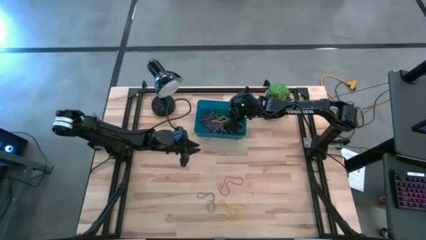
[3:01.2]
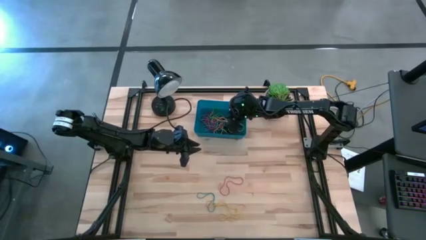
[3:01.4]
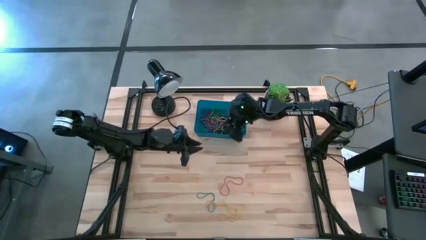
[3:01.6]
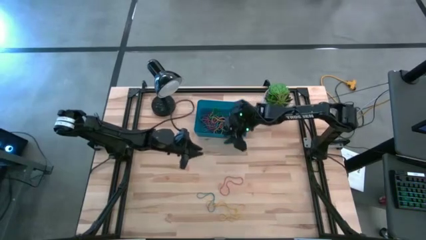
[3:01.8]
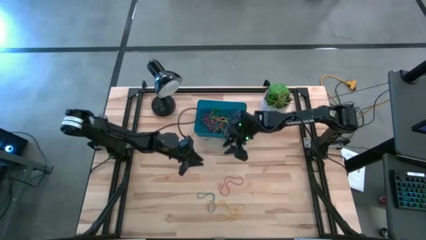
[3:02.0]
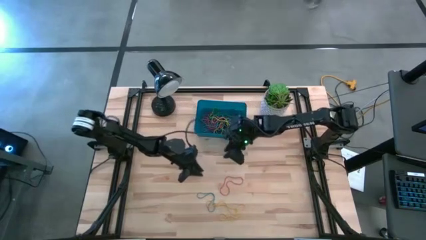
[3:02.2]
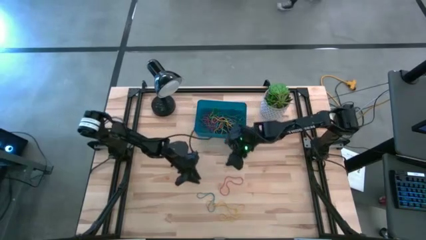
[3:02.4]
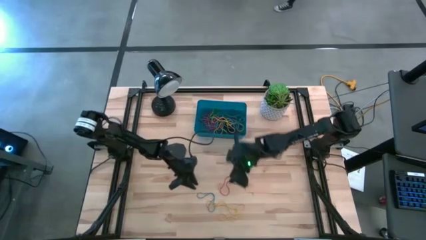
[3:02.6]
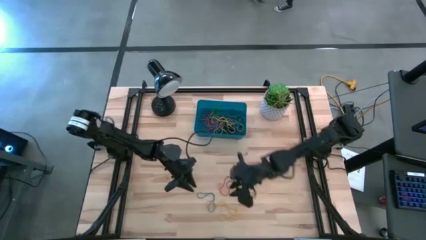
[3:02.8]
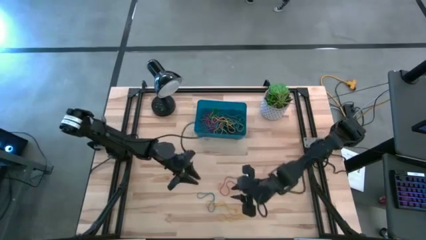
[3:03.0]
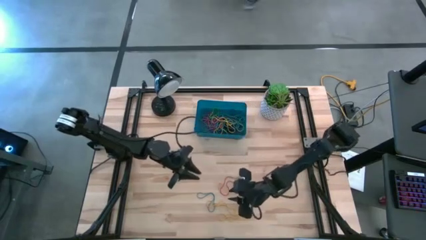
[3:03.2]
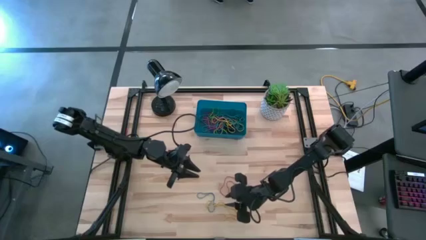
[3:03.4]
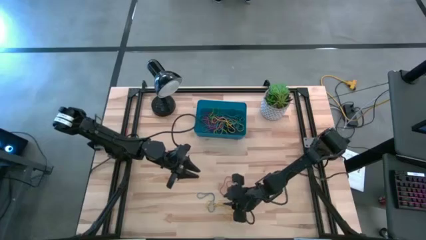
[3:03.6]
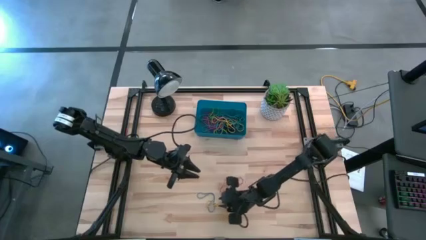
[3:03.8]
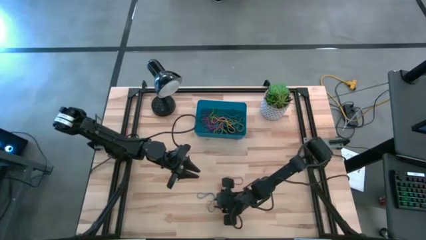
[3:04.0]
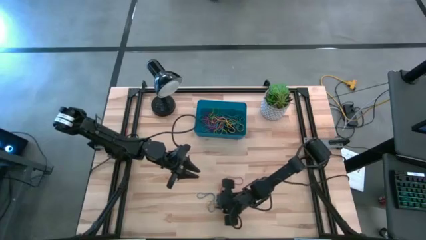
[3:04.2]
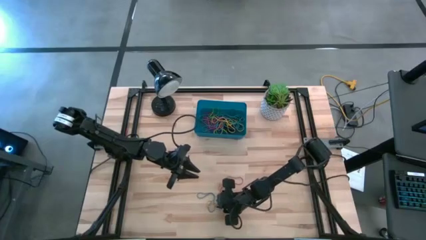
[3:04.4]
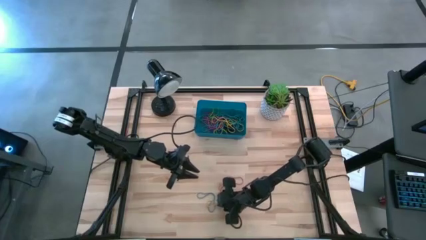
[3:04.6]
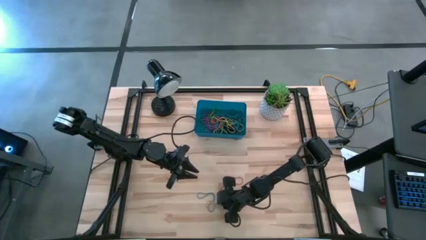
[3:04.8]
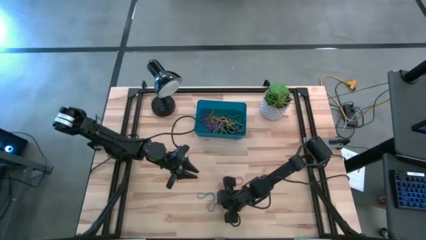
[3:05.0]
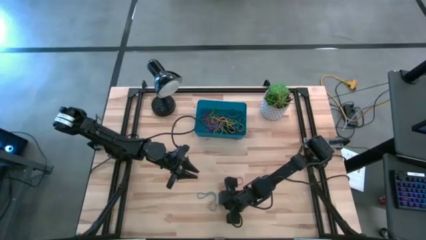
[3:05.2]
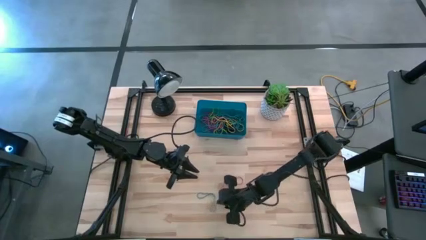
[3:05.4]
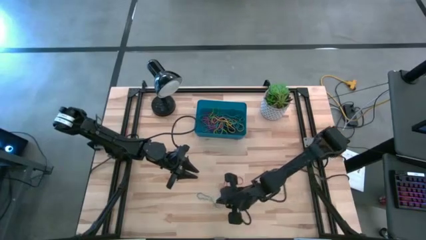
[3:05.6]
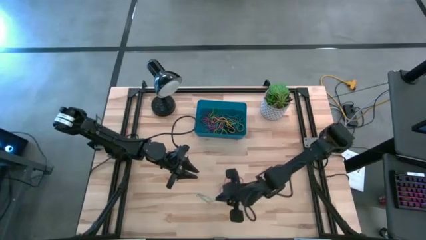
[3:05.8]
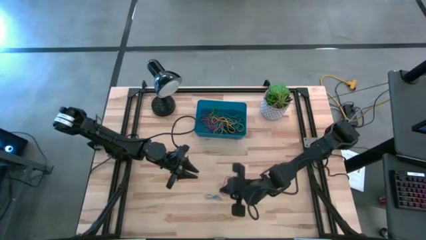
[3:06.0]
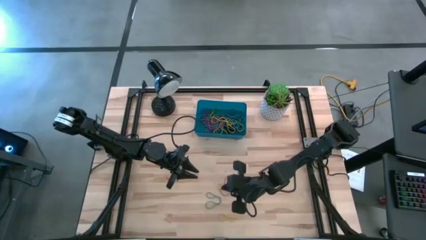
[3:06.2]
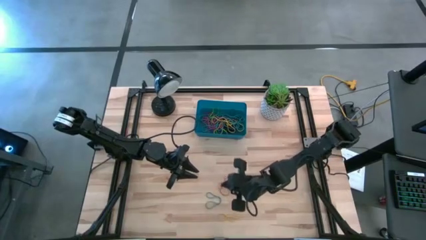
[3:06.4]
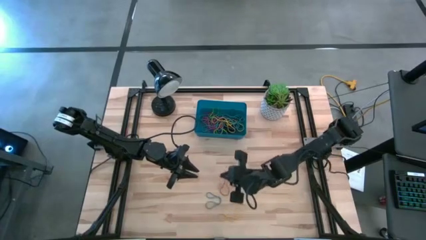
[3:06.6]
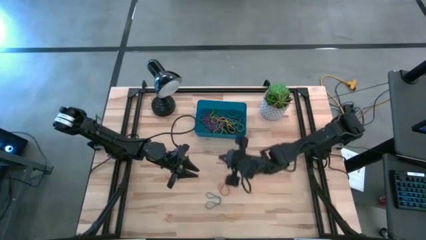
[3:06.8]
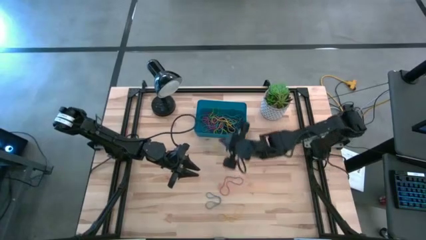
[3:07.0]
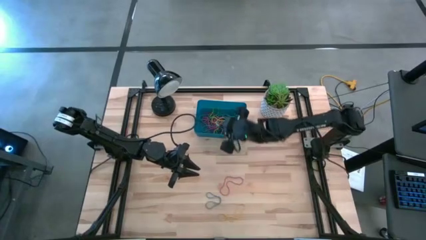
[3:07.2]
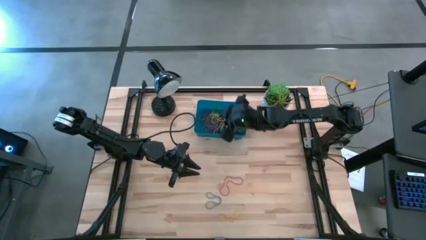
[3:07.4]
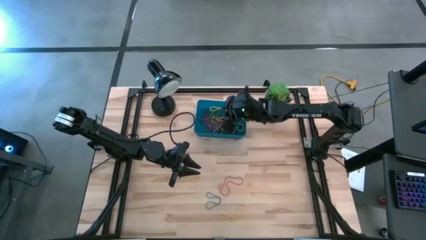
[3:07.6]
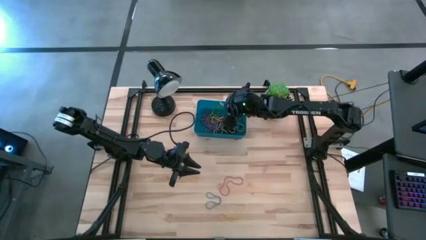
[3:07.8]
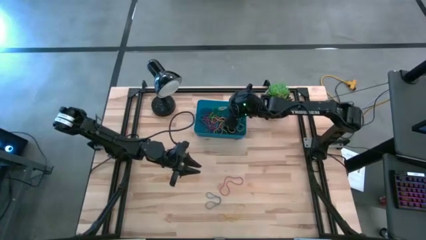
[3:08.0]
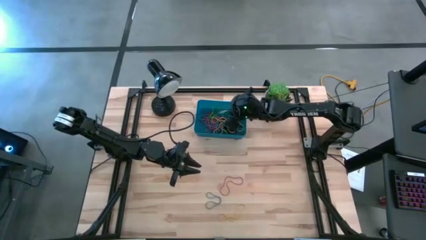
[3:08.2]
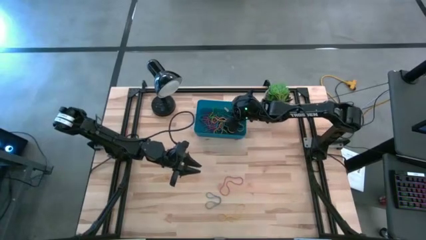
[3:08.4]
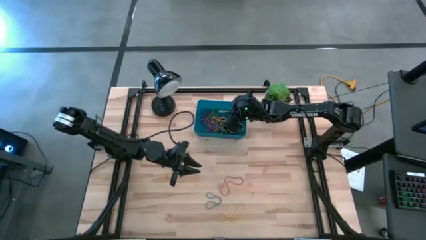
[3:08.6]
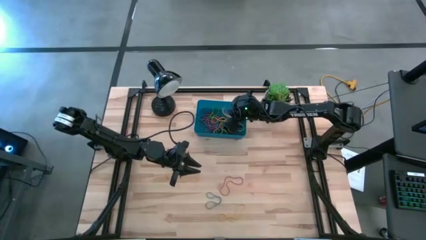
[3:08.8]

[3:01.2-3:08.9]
Task: Pick and place rubber bands into bin
Put the top yellow rubber band into the blue bin

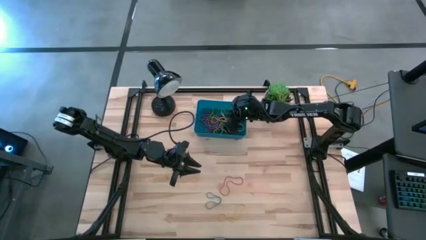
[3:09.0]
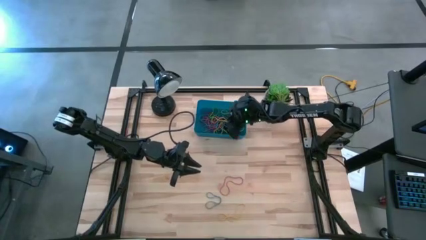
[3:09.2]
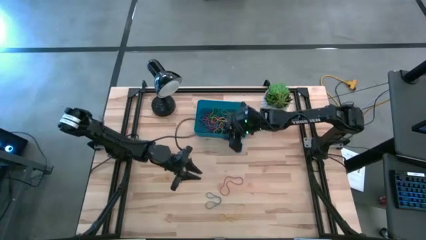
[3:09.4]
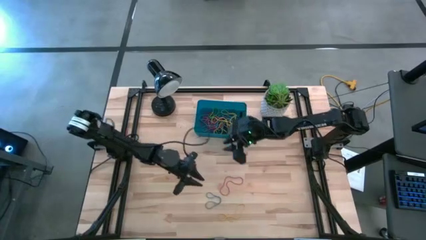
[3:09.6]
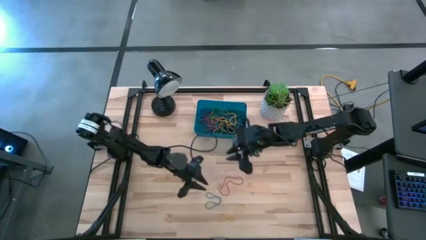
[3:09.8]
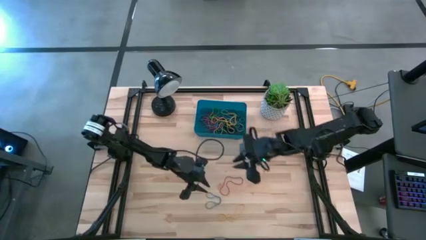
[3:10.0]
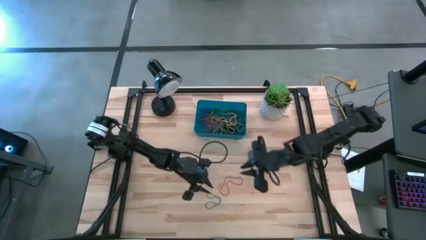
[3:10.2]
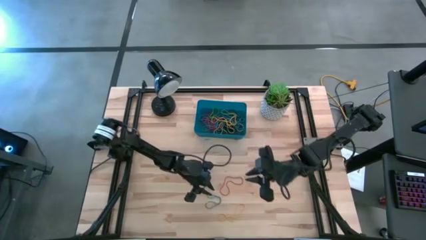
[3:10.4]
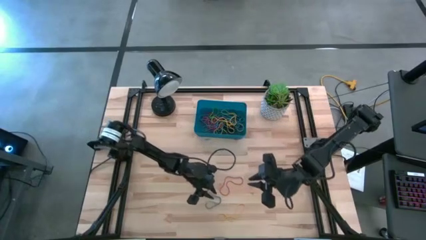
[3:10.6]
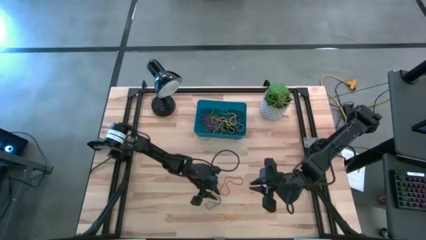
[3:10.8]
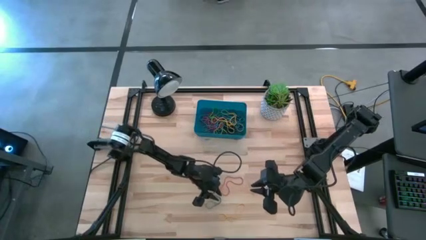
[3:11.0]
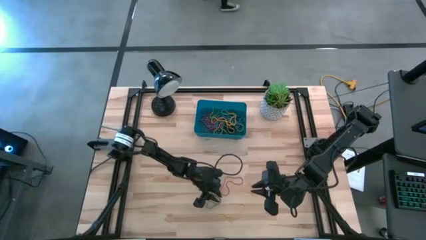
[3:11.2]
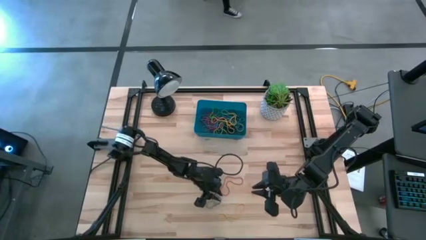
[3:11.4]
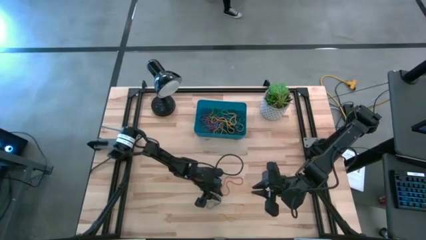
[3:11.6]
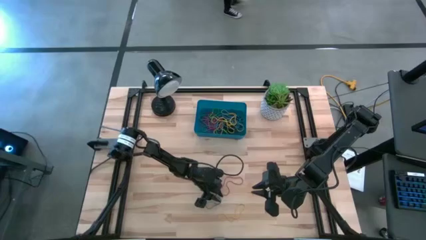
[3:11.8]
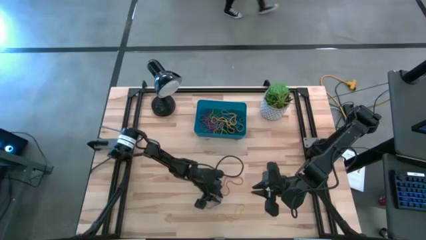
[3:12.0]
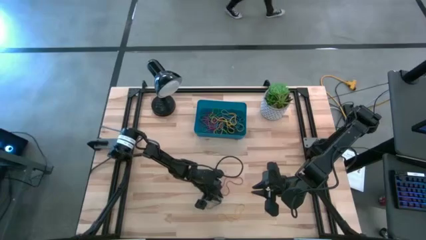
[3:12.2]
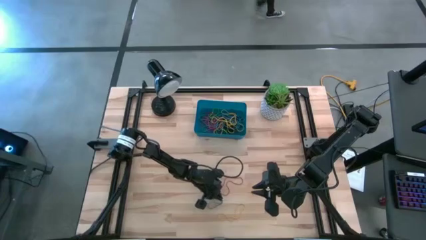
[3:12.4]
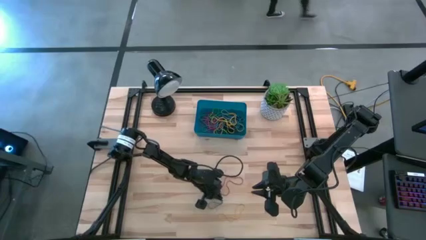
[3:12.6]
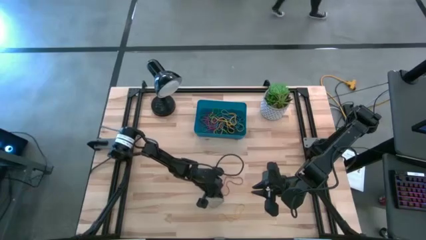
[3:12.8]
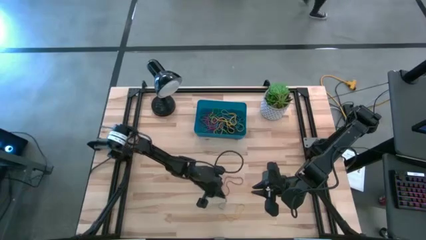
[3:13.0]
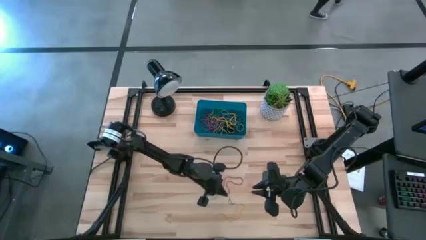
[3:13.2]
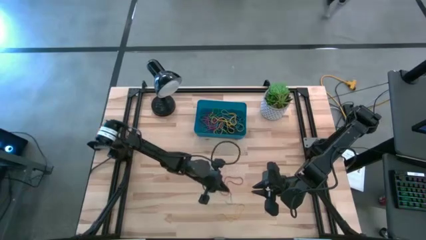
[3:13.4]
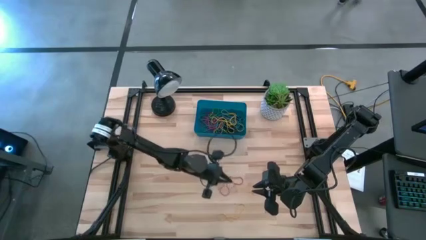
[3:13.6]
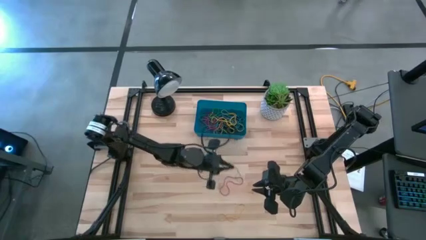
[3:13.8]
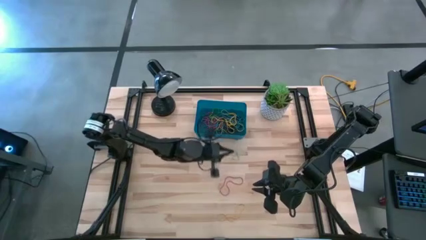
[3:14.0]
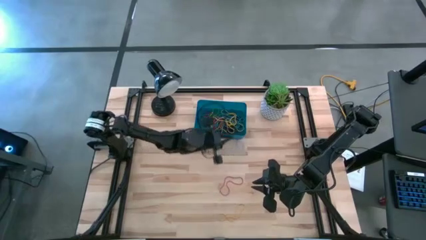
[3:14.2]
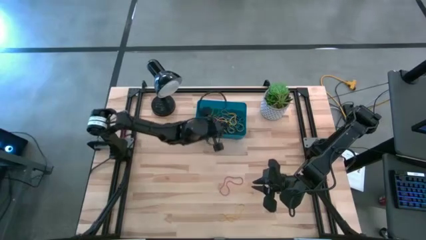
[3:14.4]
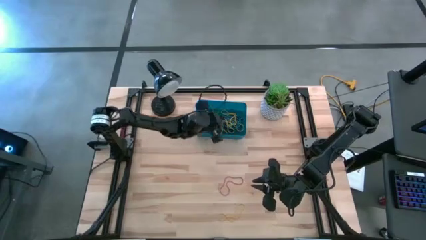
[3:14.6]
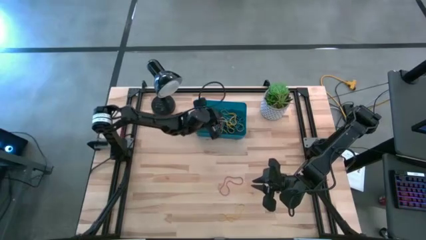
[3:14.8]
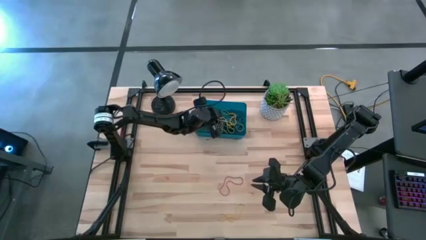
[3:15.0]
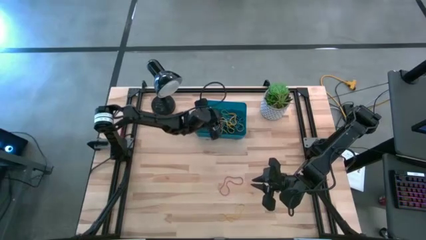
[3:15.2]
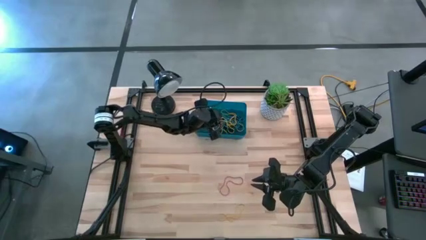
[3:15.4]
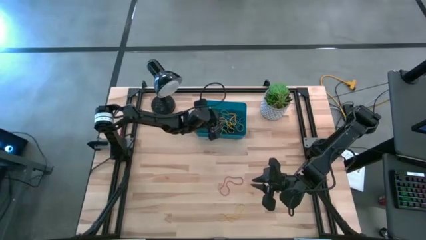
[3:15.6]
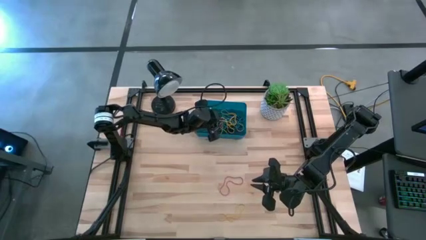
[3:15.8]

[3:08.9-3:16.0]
Put the blue rubber band into the blue bin
